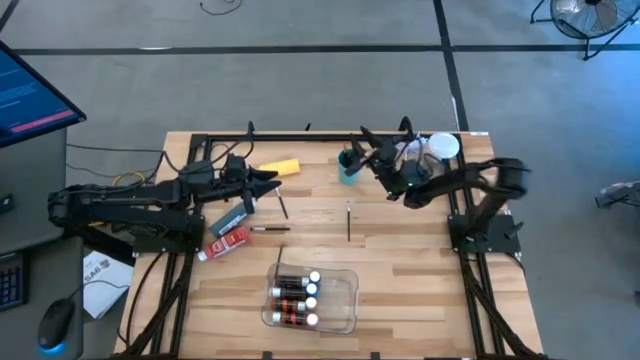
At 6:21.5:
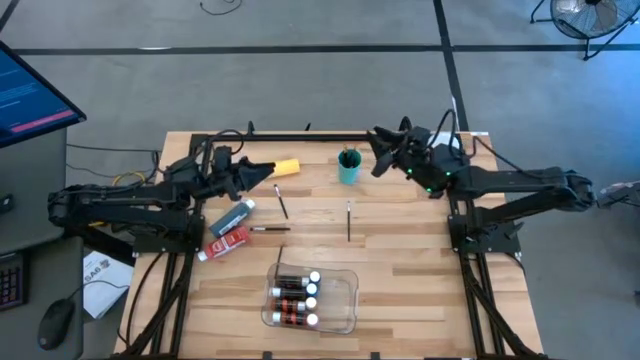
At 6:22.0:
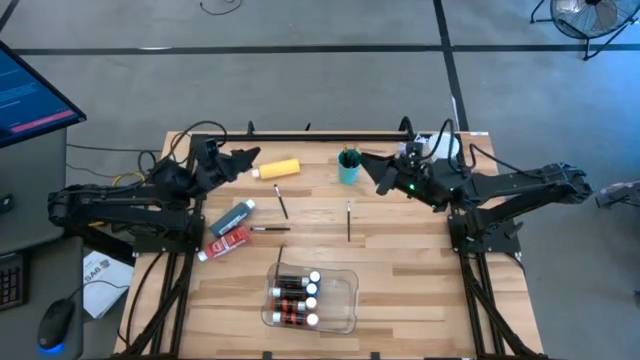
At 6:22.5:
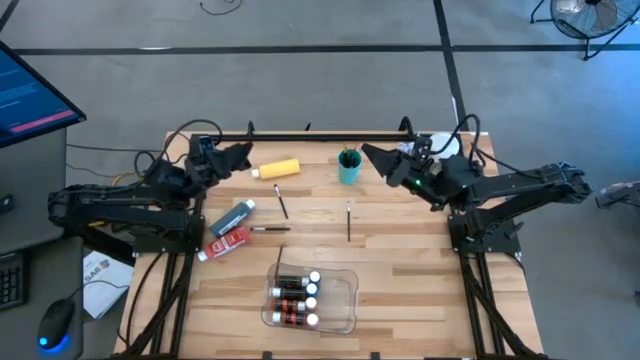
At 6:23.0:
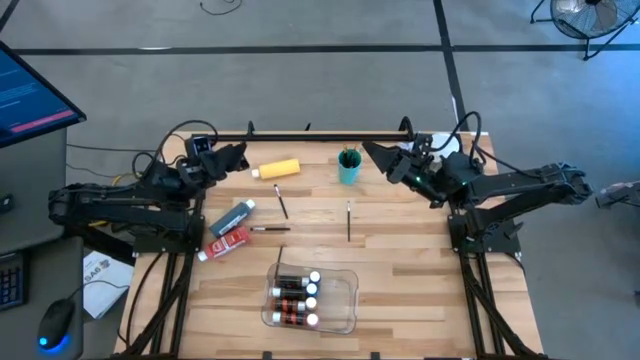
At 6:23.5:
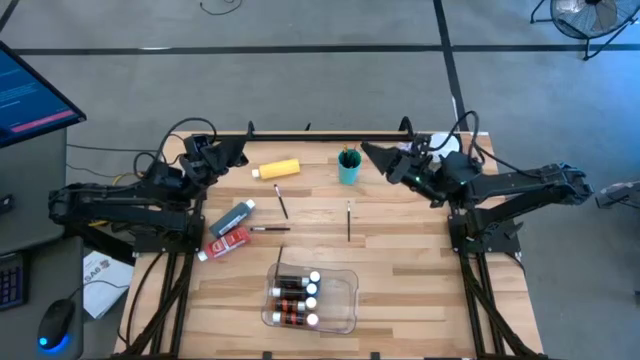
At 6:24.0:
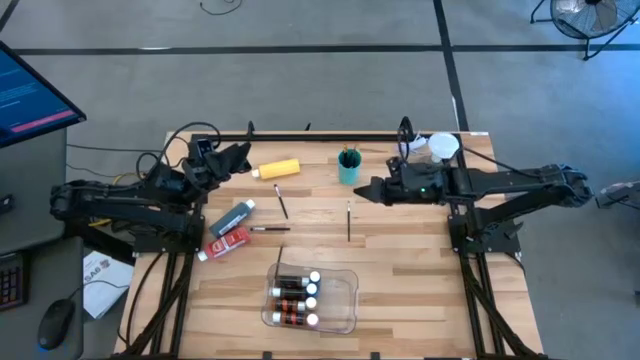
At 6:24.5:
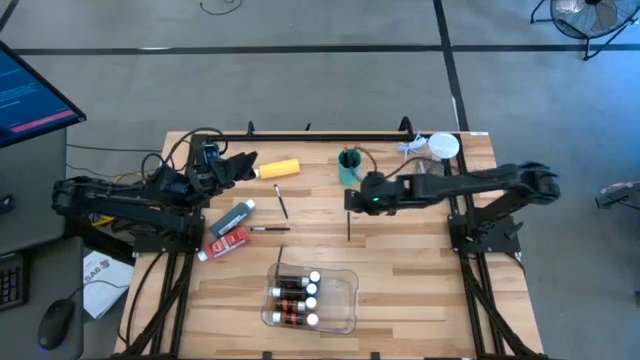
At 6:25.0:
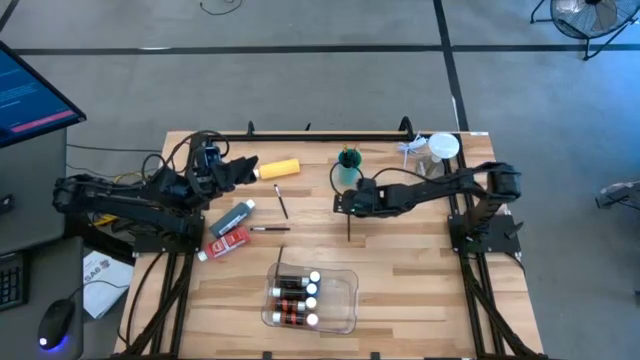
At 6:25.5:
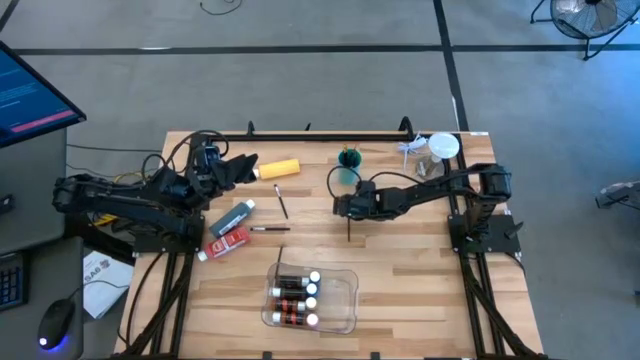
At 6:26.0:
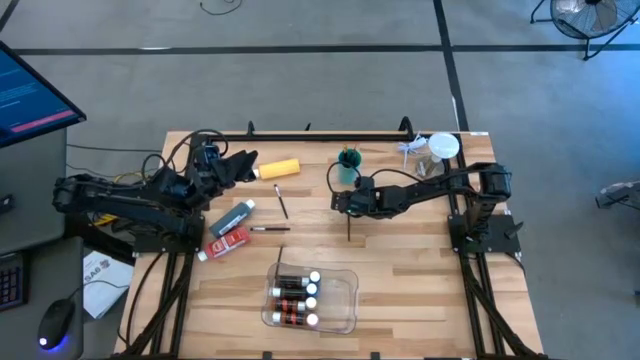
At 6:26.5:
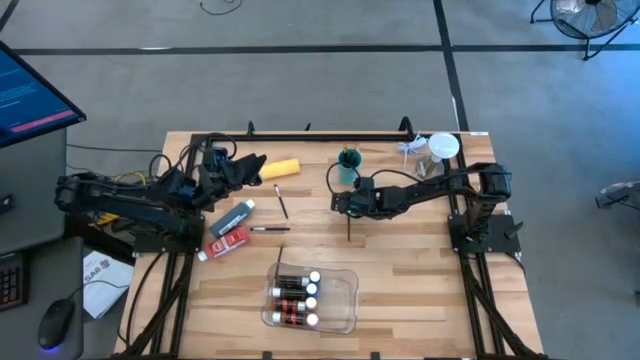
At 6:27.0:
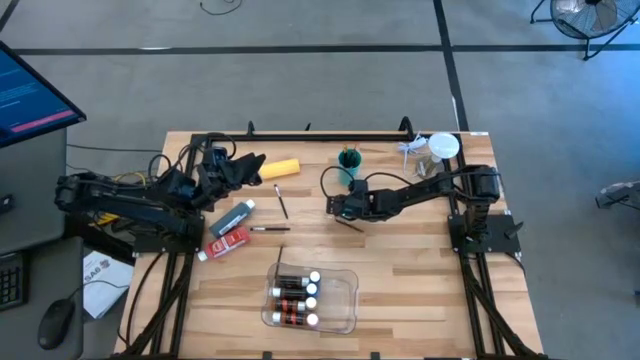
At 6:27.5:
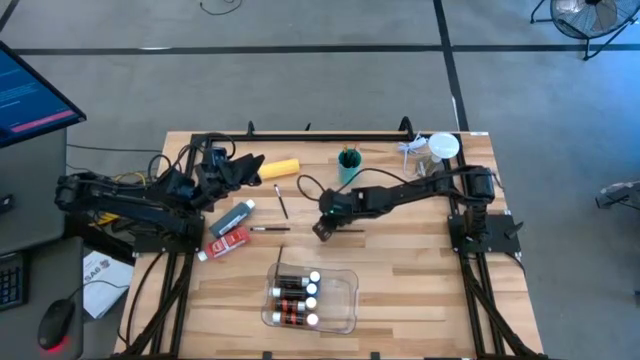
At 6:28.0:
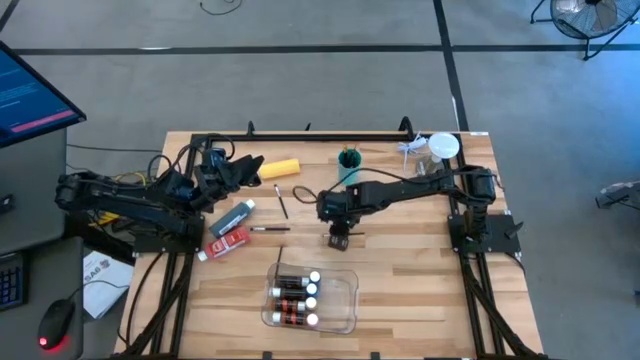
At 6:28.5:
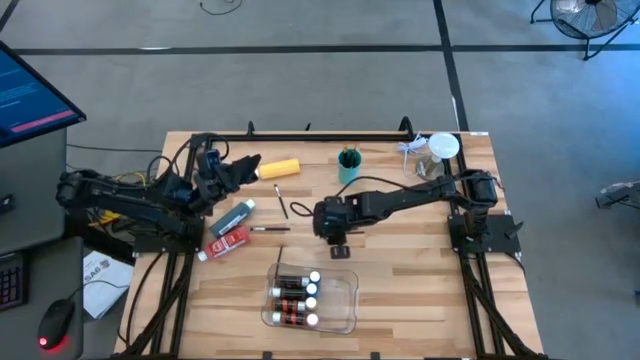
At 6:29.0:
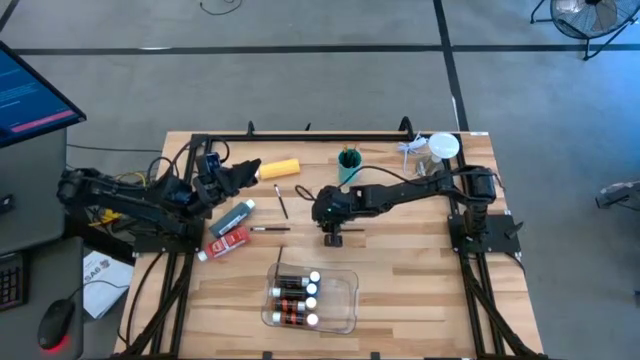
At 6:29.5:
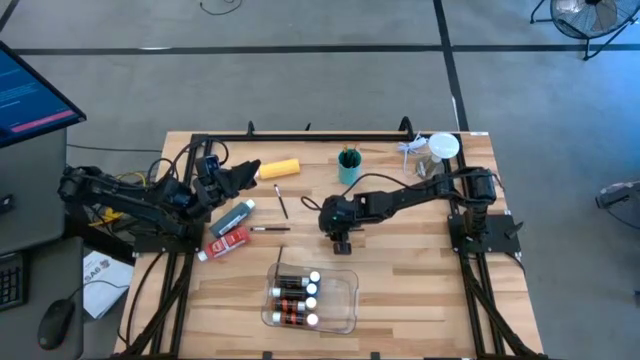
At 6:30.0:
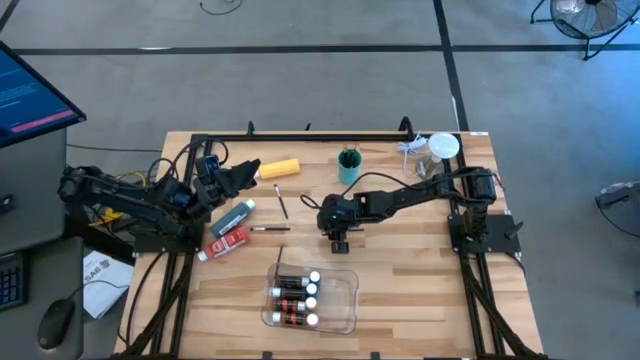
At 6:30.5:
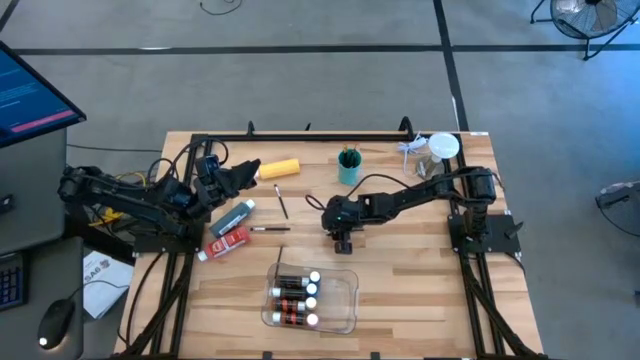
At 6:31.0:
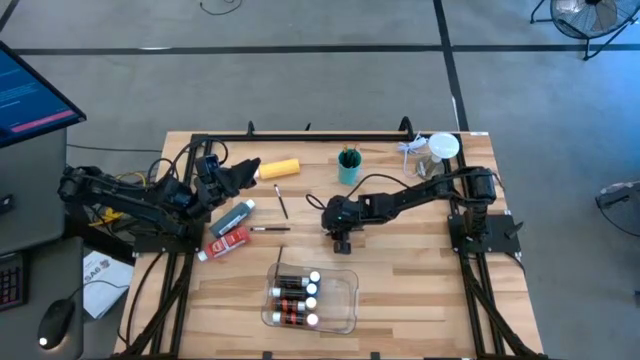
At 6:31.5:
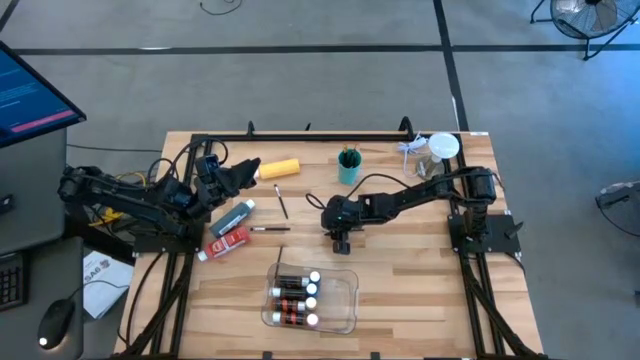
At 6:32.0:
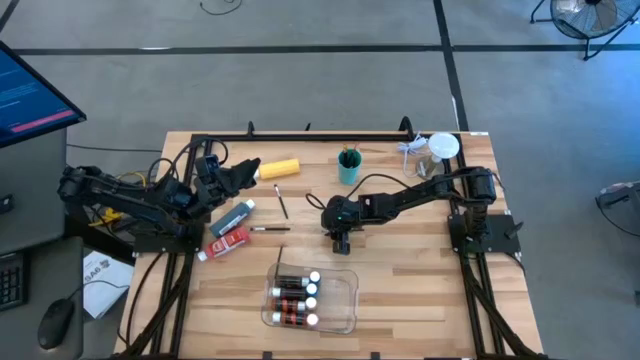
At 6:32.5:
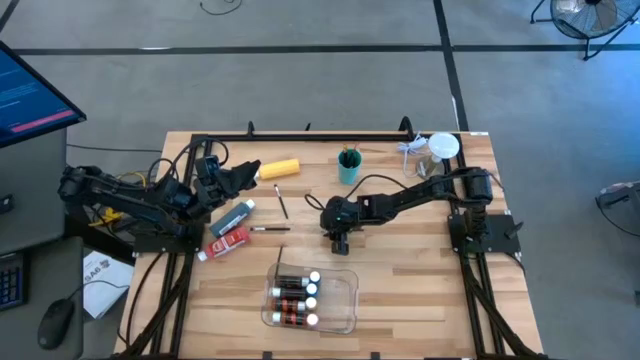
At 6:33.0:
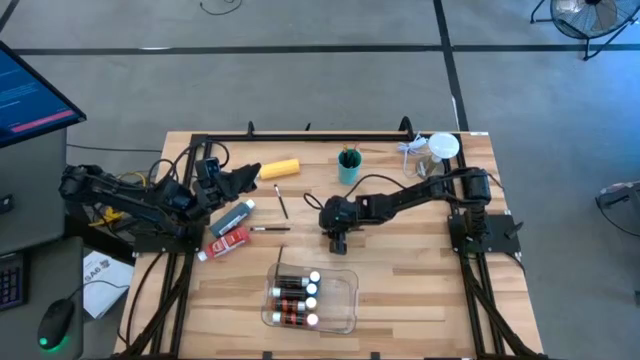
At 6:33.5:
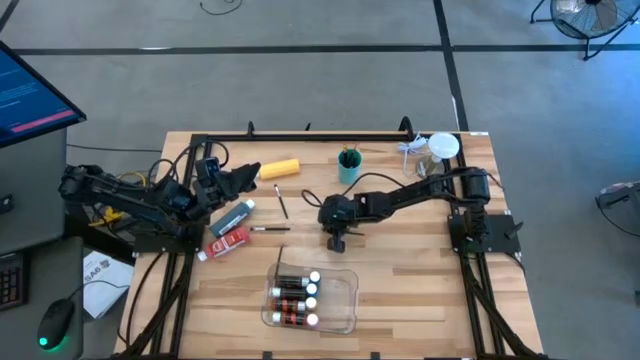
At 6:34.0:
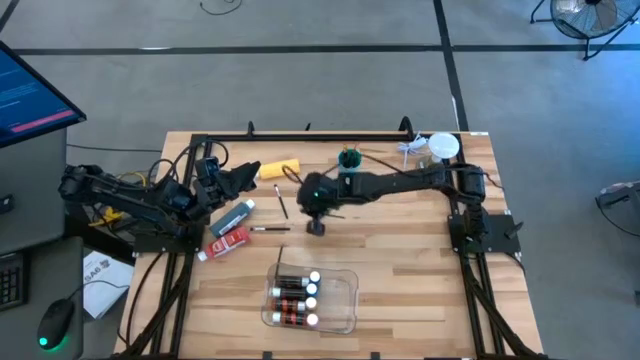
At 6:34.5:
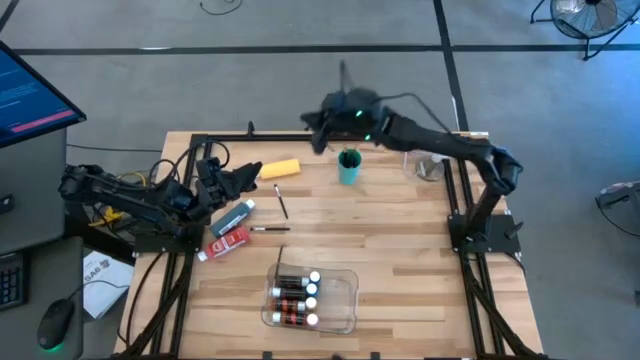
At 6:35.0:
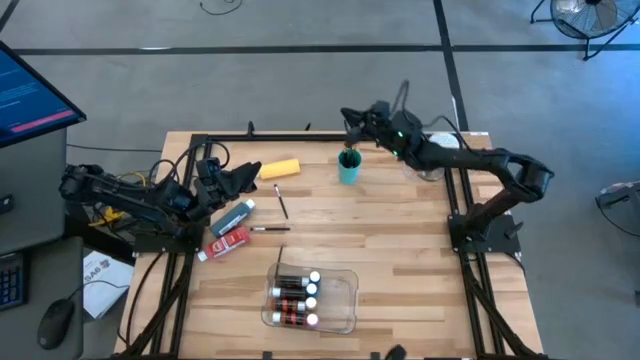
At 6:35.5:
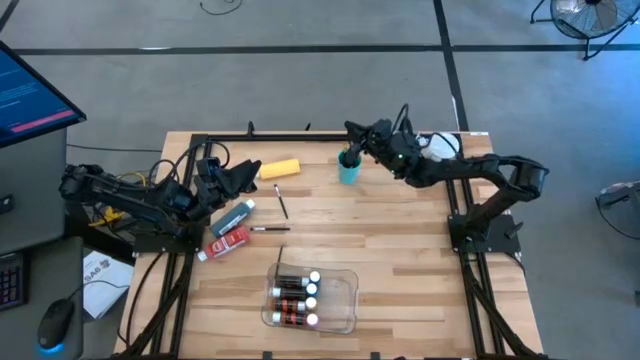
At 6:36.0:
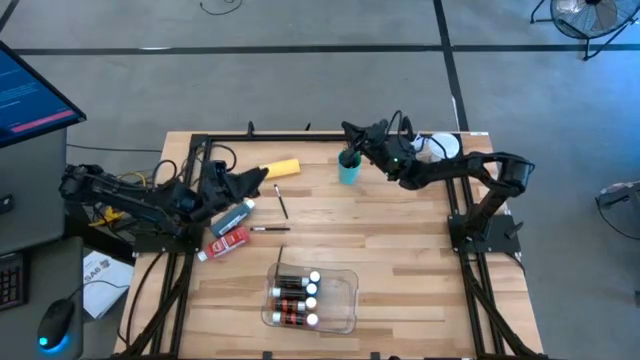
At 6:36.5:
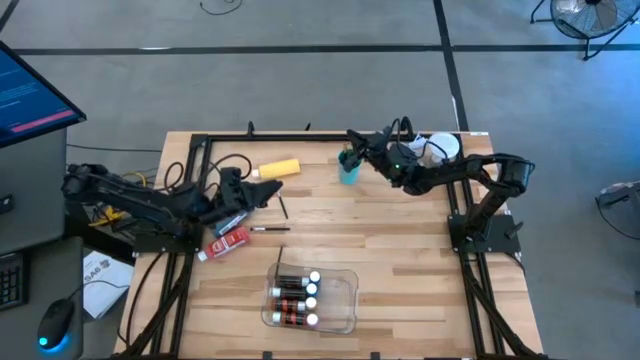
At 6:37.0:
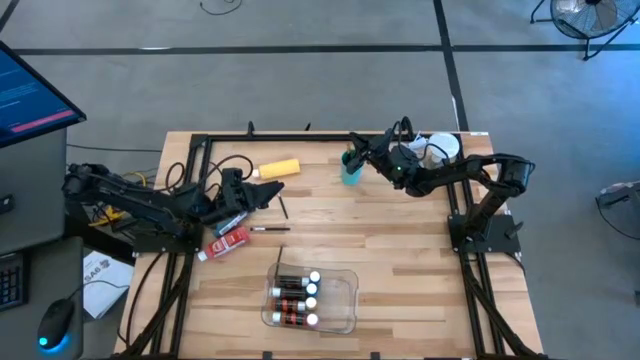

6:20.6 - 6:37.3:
Task: Pick & Place Paint Supplies
Put the silver paint brush into the green cup

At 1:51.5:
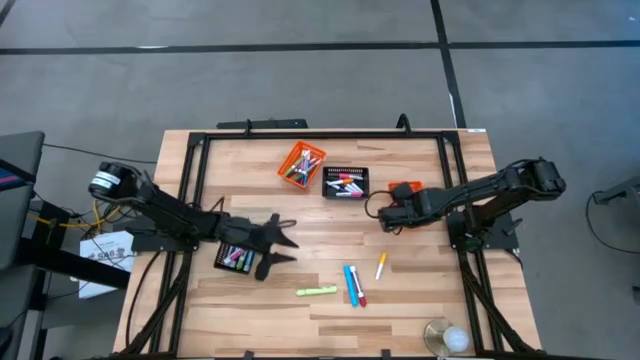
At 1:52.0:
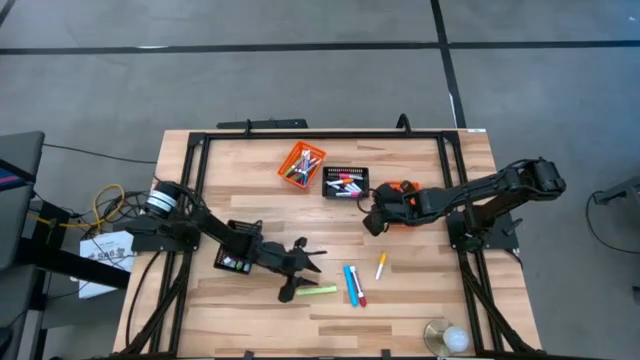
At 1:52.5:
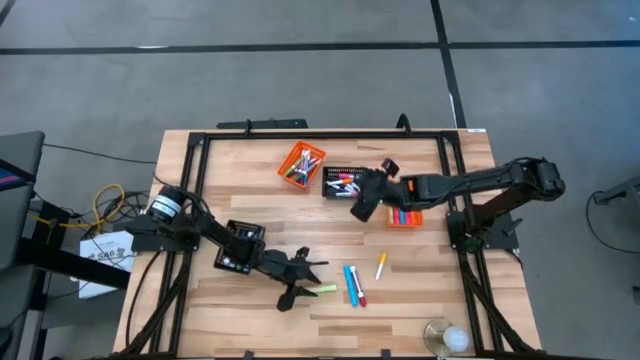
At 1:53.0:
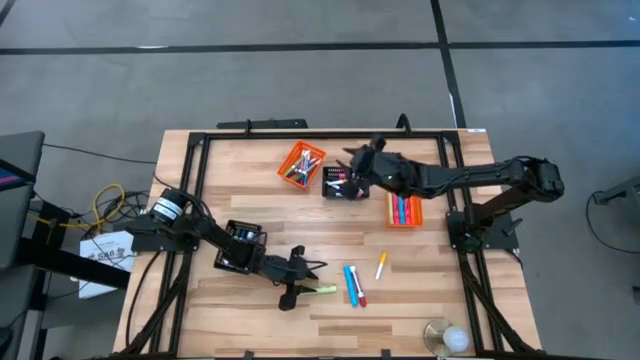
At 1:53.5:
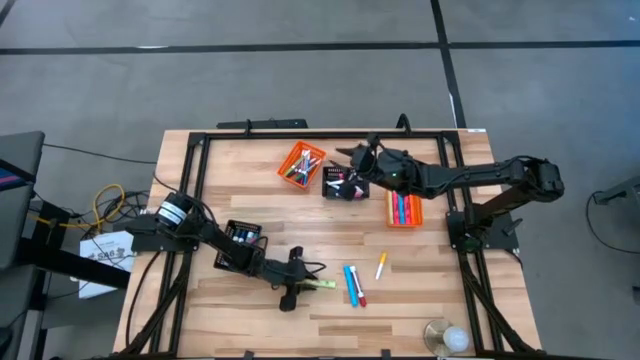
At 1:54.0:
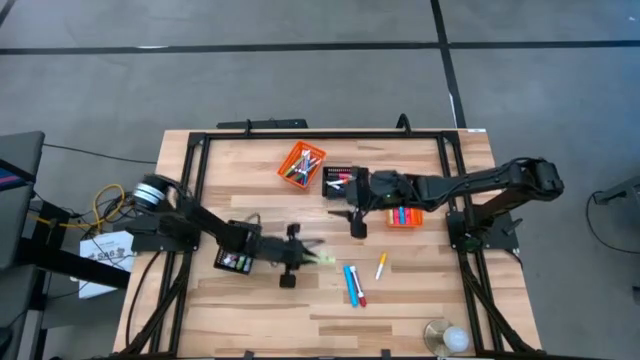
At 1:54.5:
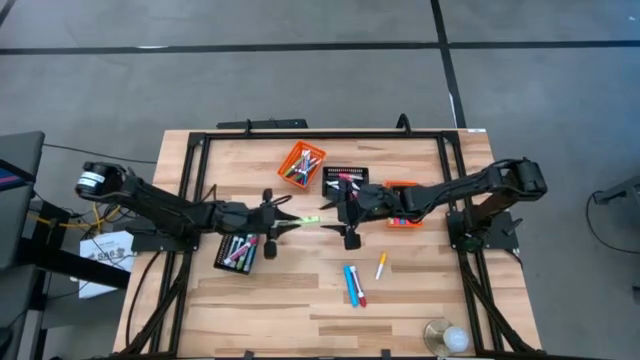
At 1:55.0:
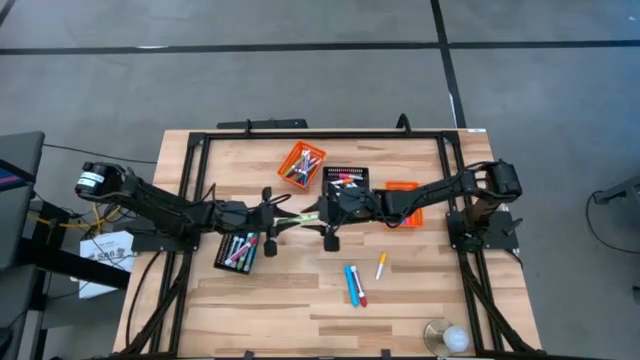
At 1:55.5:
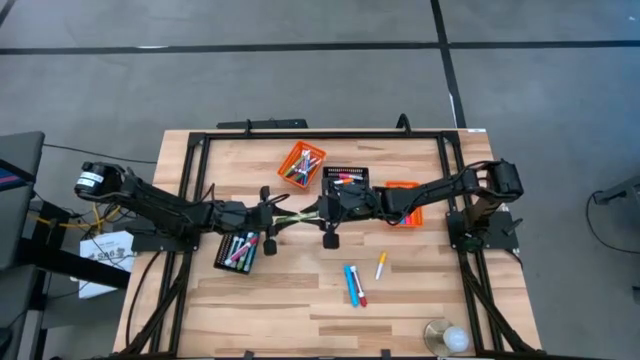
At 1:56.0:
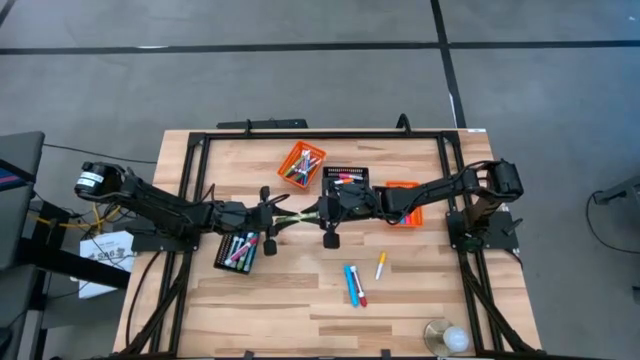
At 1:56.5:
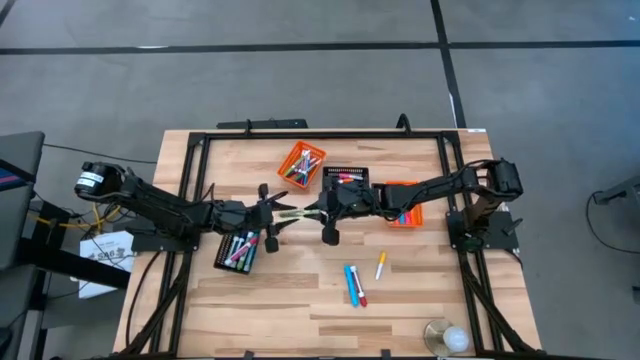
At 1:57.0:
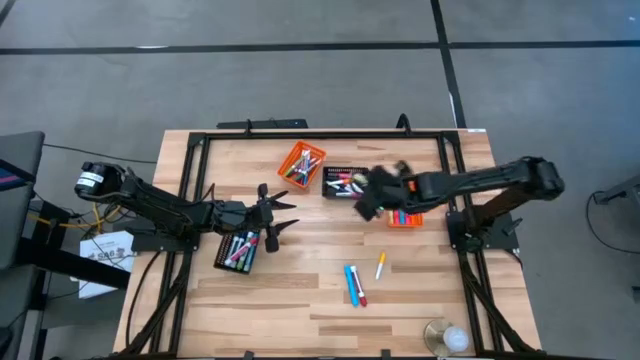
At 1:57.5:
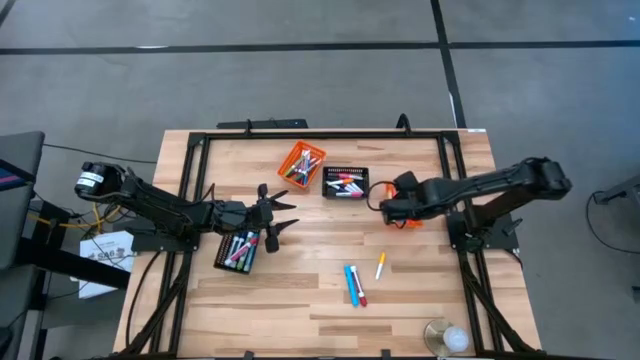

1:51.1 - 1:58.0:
Task: Pick & Place Markers
Put the light green highlighter into the right orange bin
